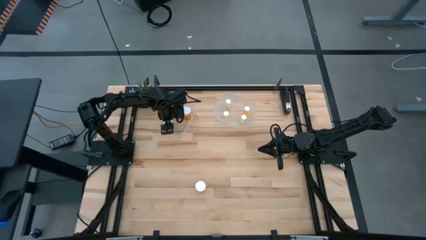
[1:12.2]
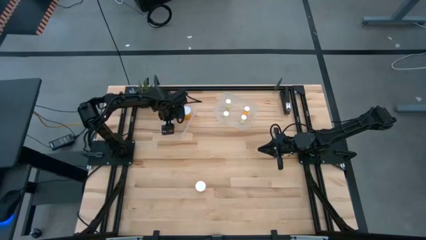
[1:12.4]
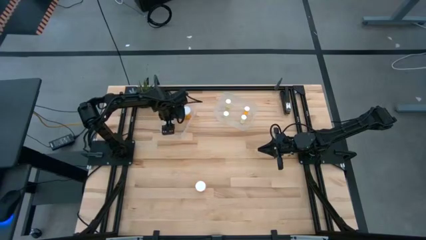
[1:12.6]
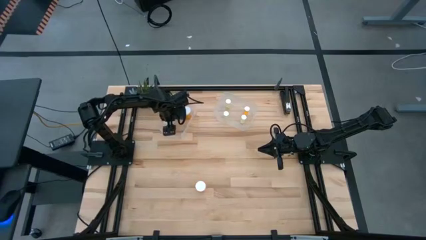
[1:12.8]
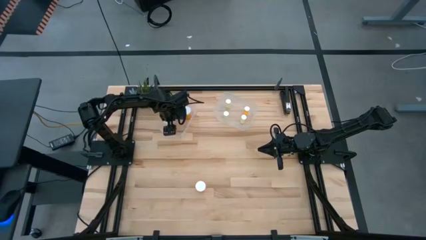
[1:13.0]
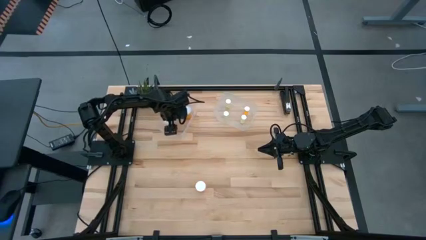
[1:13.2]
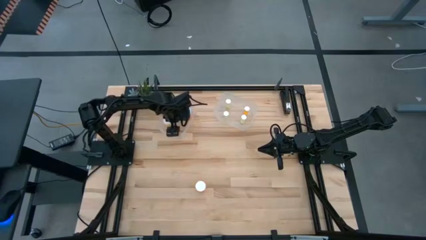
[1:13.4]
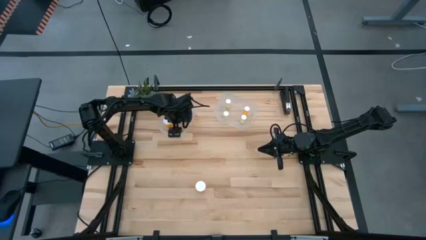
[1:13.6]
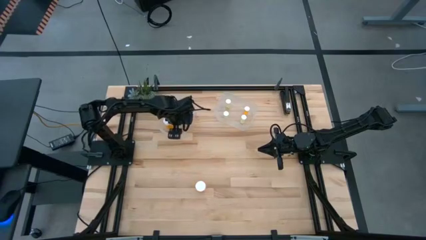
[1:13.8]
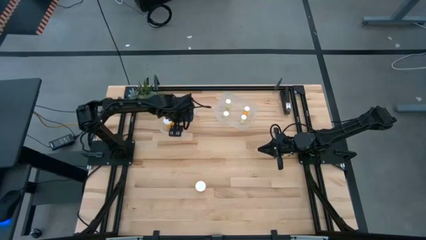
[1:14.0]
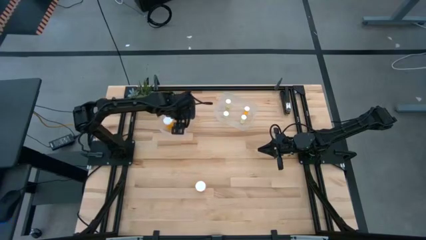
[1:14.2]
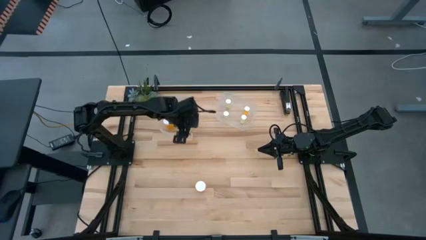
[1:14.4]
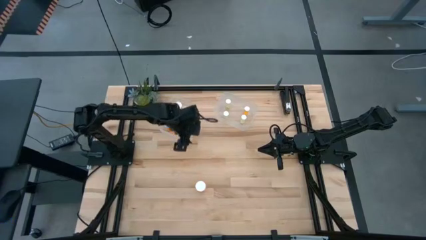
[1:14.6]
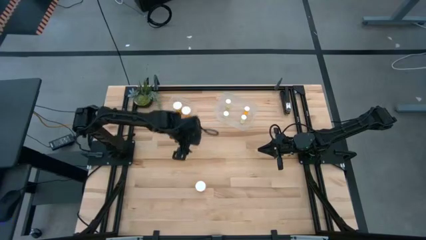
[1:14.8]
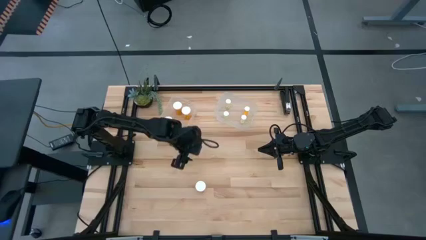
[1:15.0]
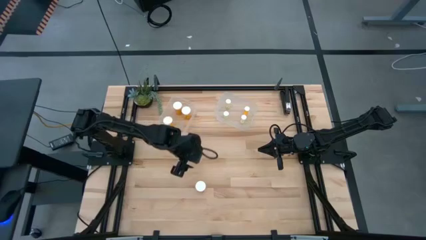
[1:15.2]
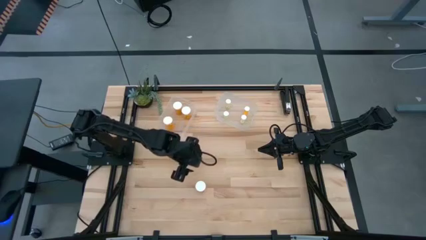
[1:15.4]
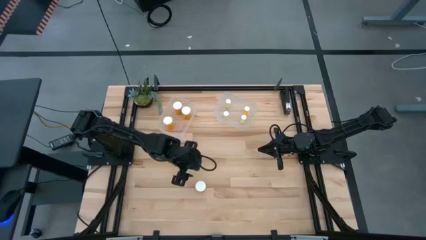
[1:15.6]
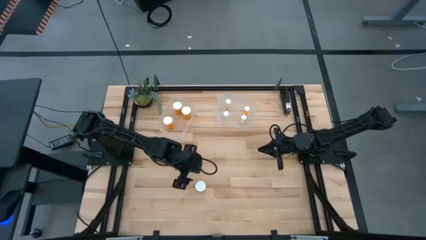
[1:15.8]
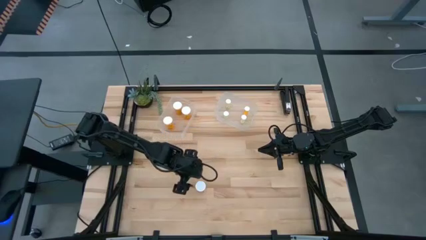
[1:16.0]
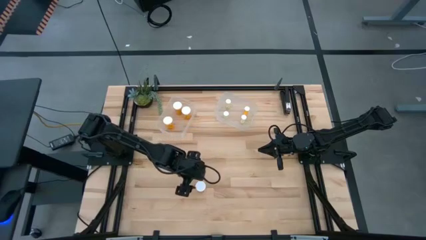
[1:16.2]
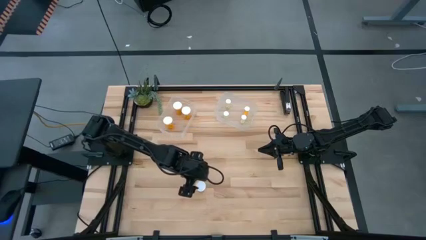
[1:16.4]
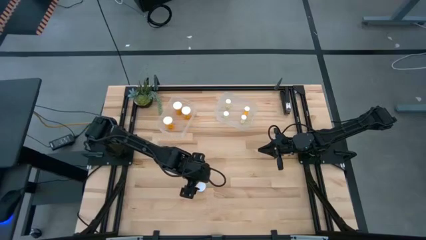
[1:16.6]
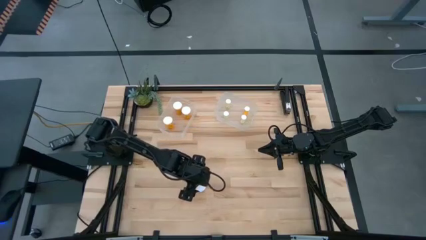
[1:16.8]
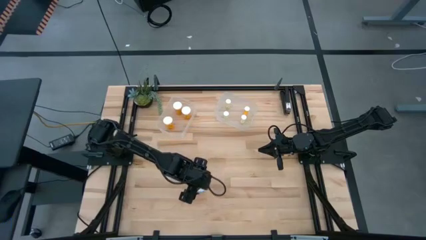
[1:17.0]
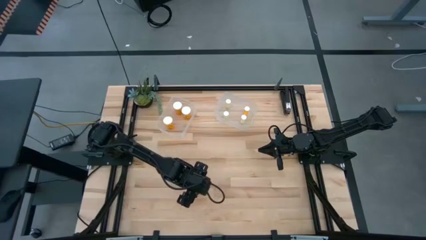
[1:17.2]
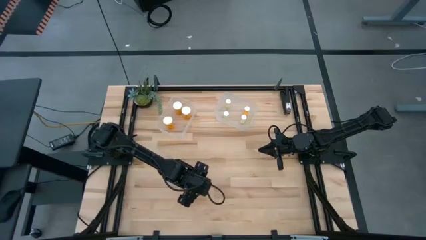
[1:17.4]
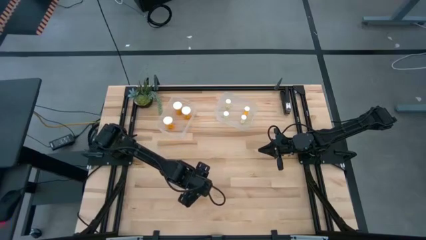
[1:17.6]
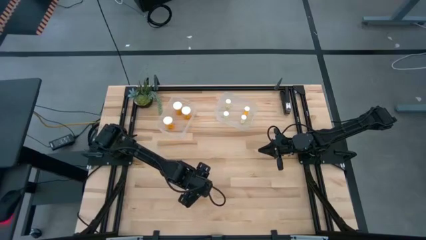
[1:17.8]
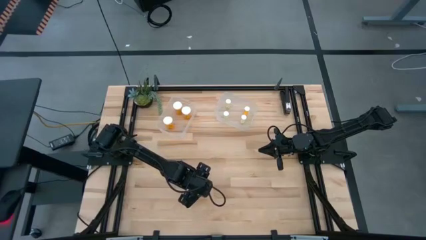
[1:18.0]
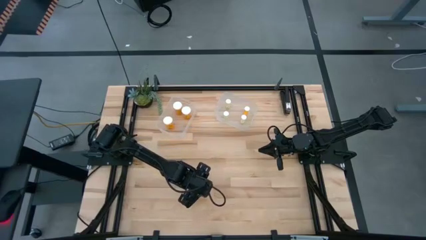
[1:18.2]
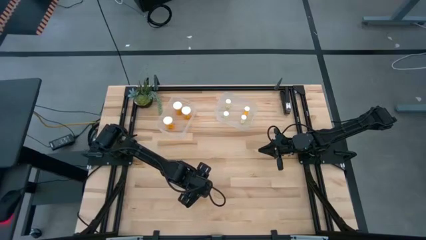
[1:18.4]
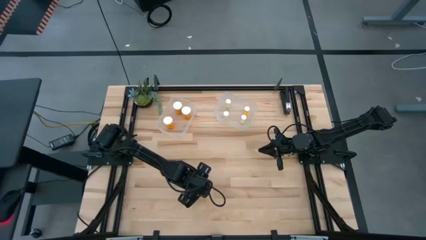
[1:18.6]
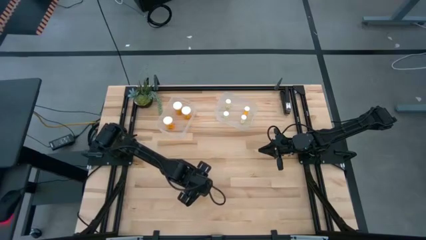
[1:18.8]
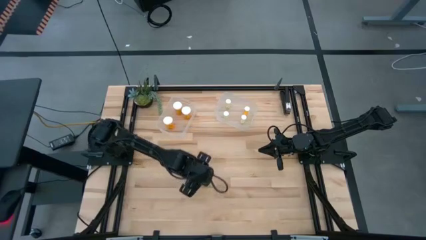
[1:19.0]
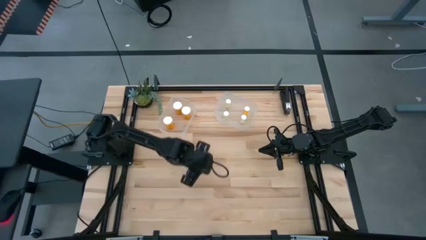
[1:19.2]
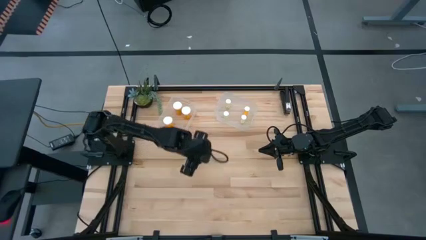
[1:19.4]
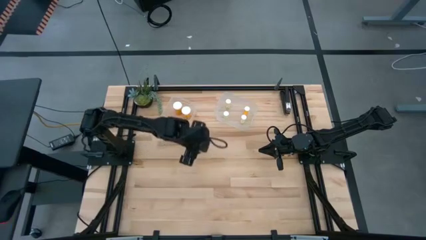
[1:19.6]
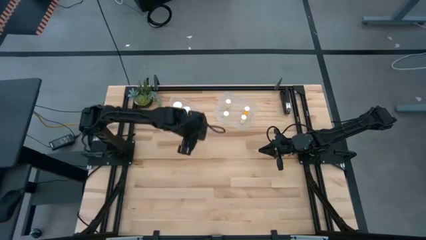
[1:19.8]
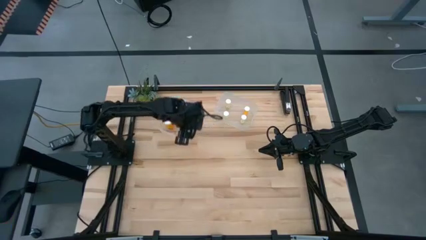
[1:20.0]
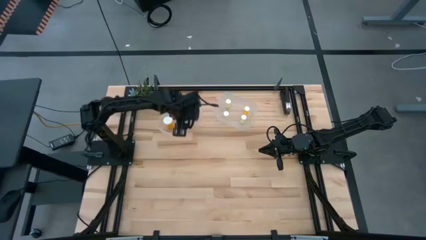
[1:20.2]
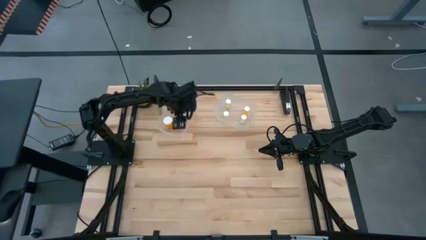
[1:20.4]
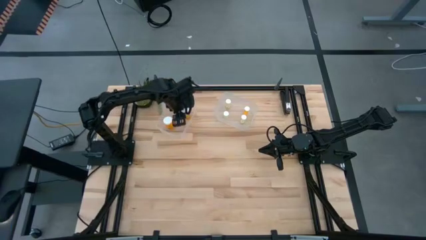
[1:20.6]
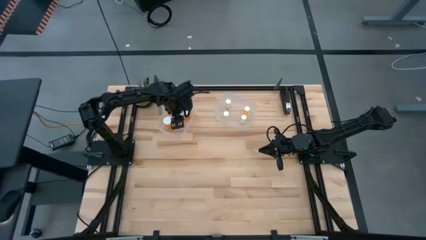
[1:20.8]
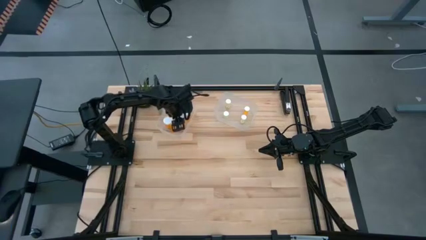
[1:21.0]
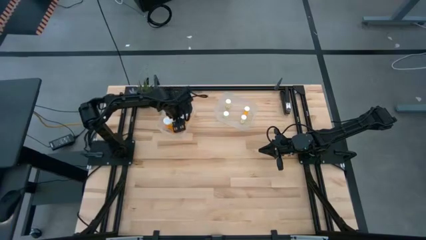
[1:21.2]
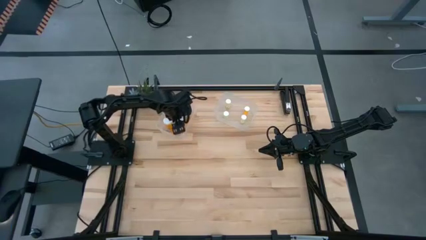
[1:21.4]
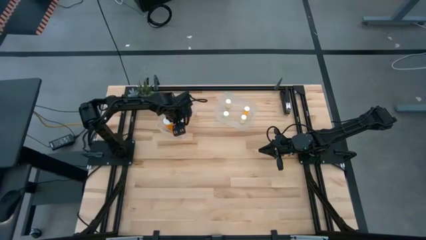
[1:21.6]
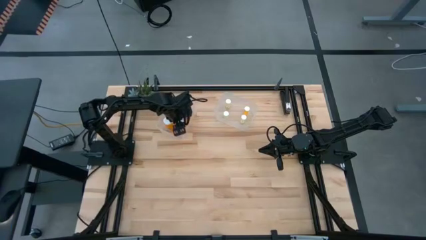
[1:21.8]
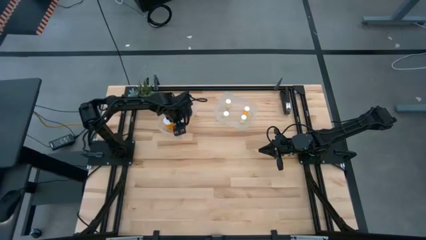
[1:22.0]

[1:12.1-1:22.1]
Task: Pick and place medicine bottles into bin by pill shape (circle, oval)
Put the large orange pill bottle into the left transparent bin
